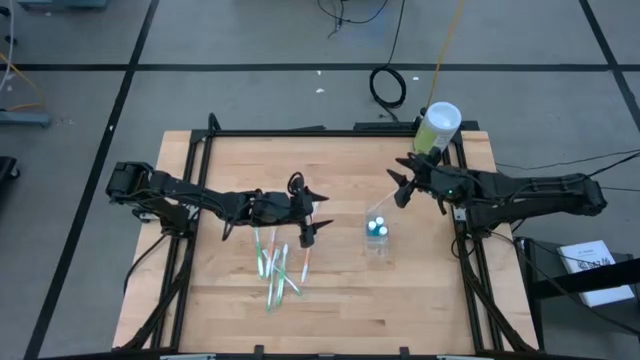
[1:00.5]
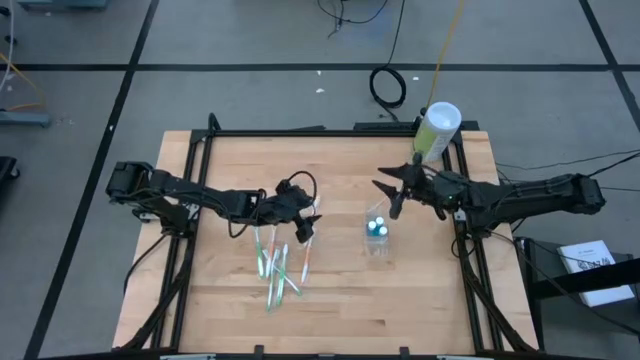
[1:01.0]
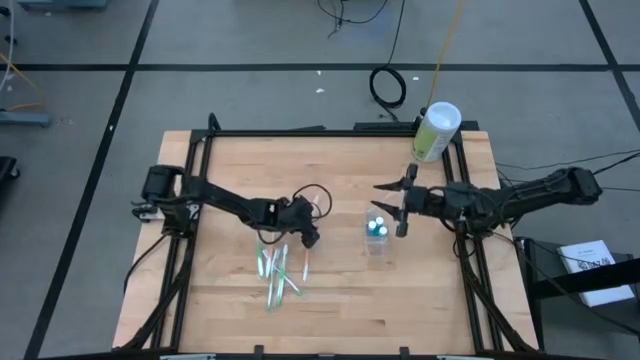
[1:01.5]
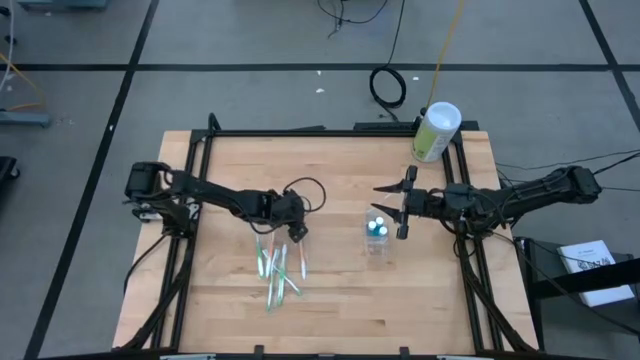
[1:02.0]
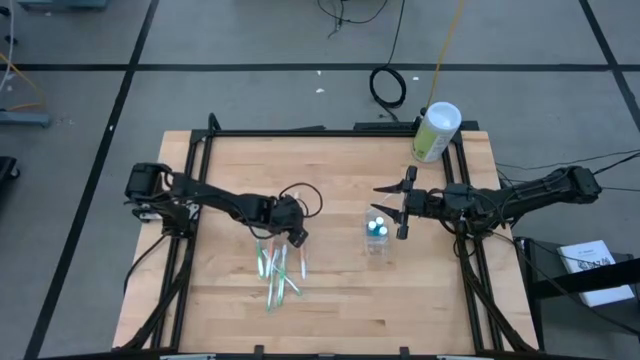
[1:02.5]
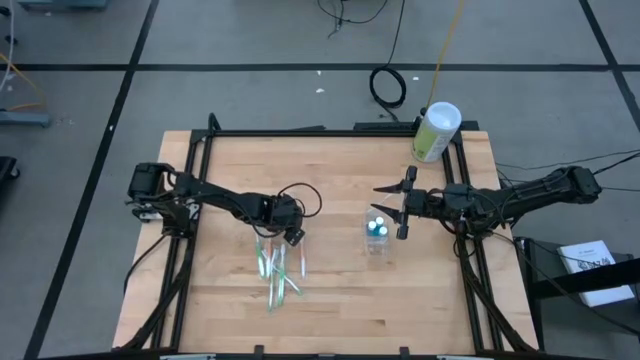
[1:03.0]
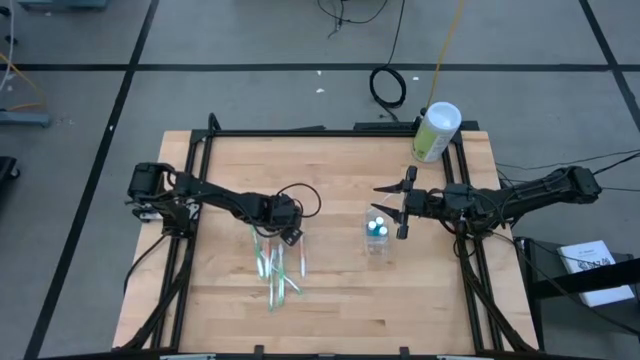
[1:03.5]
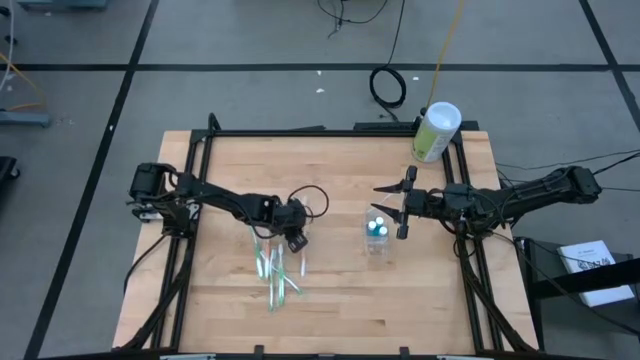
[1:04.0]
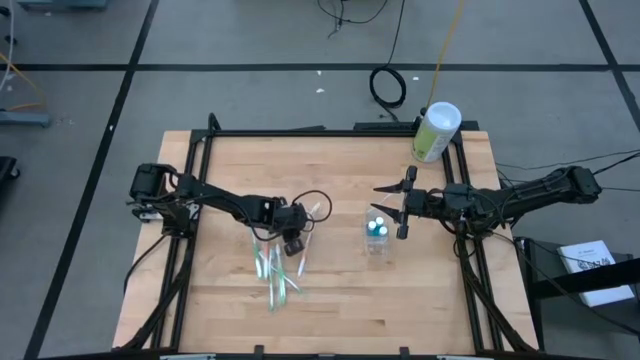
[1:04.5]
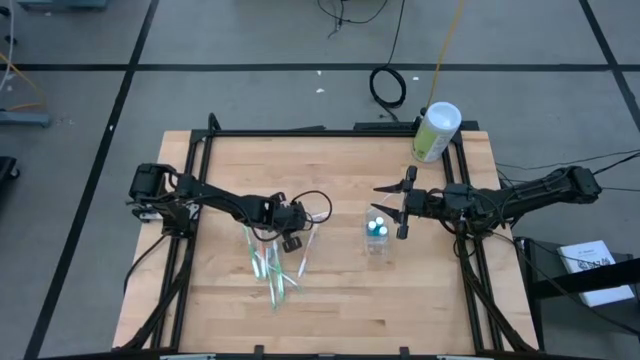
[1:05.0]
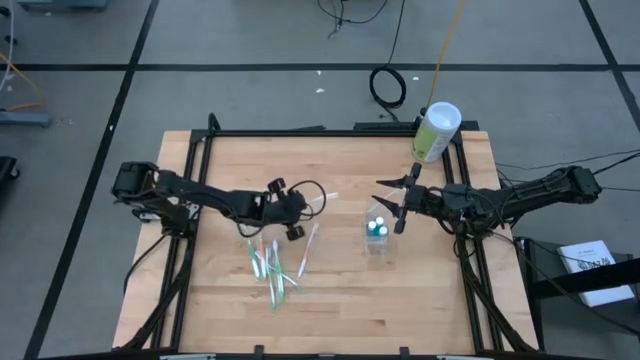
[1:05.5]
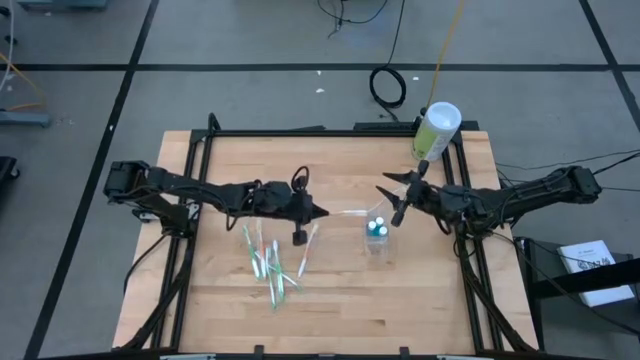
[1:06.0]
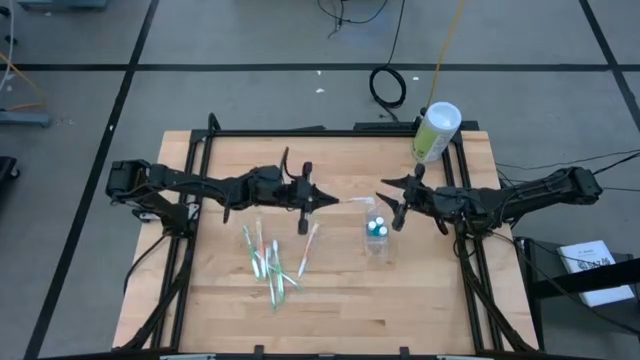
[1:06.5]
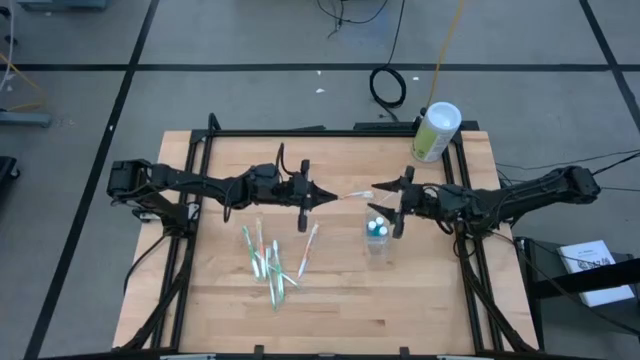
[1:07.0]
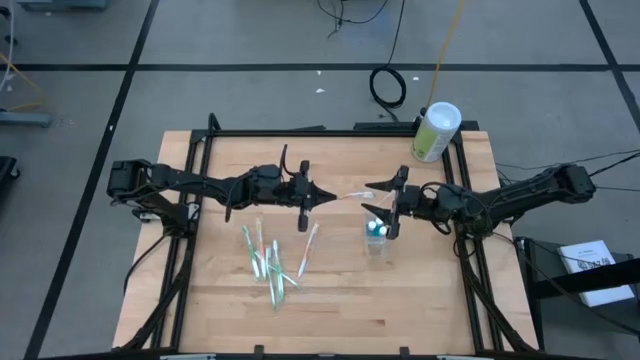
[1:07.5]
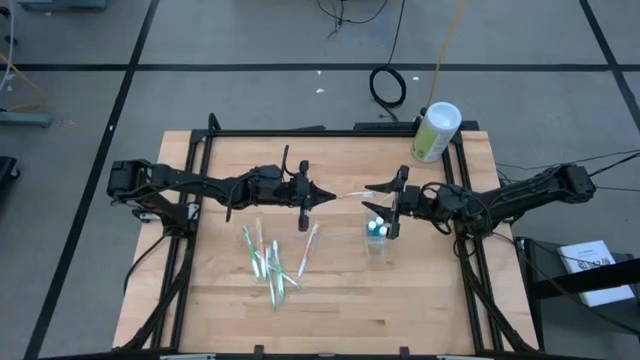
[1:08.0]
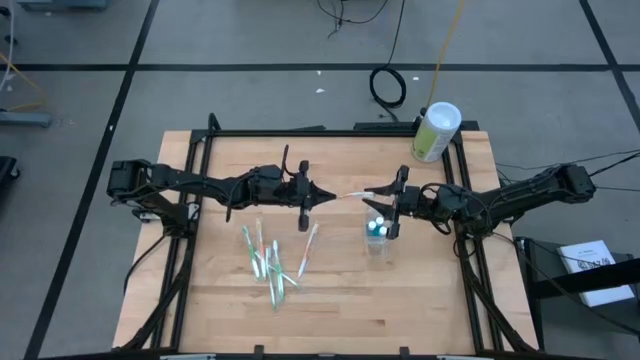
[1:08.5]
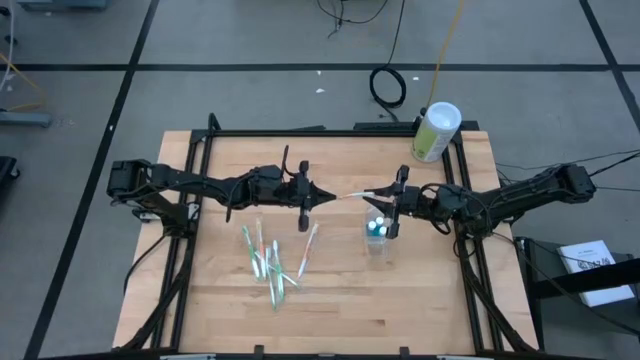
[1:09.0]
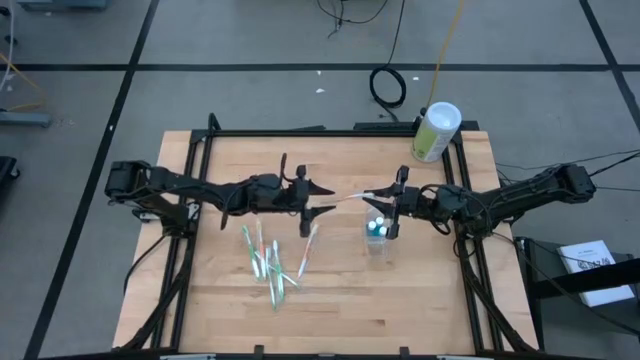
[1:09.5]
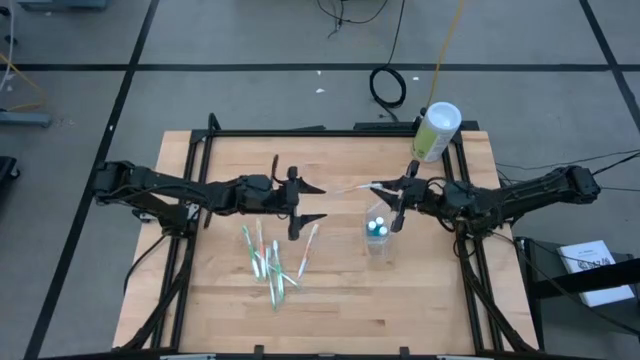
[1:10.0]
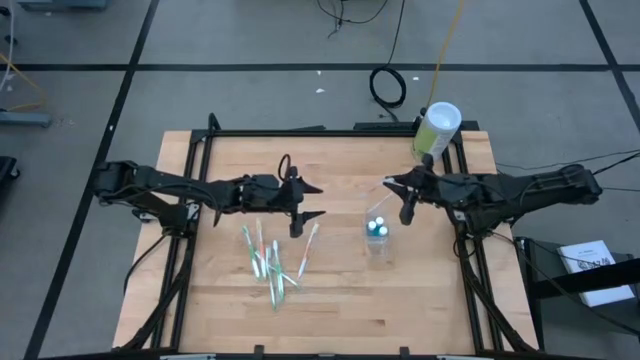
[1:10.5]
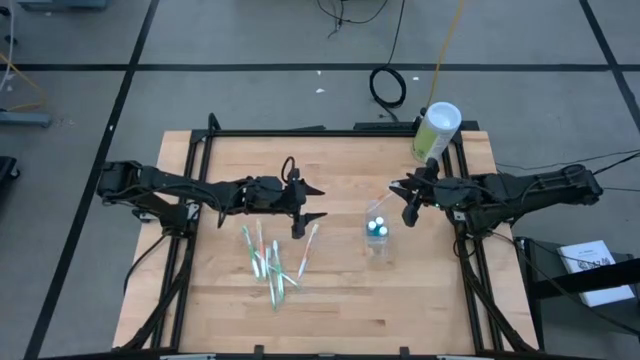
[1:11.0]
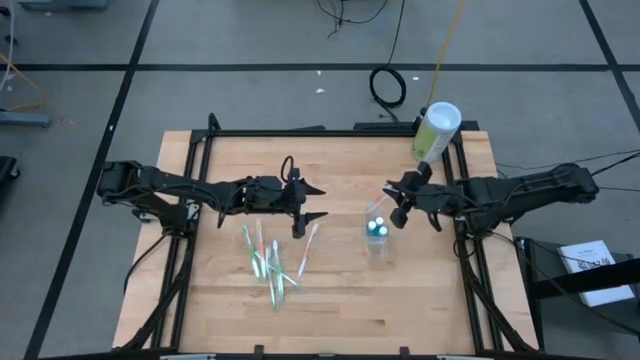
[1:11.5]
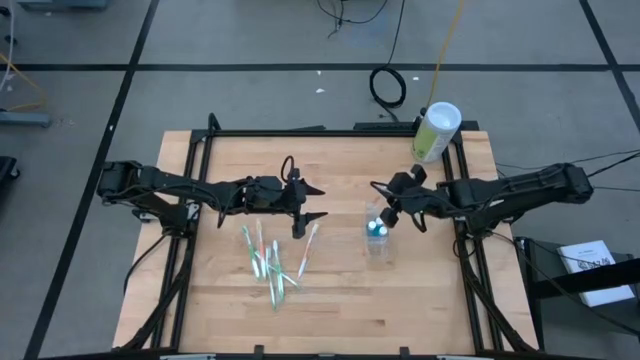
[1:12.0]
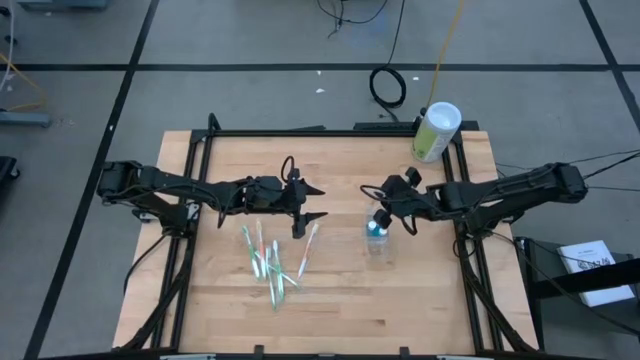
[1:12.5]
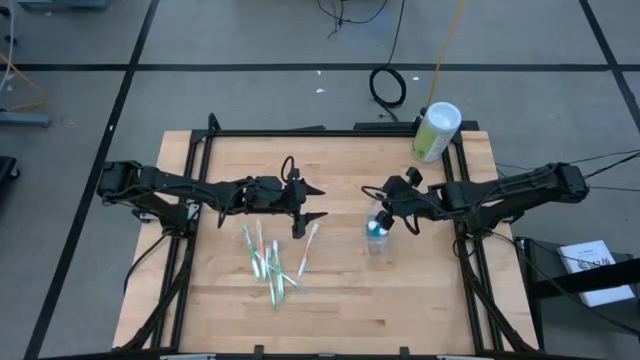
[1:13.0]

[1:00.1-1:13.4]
Task: Pick & Place toothbrushing station
Put the orange toothbrush into the top of the transparent organizer

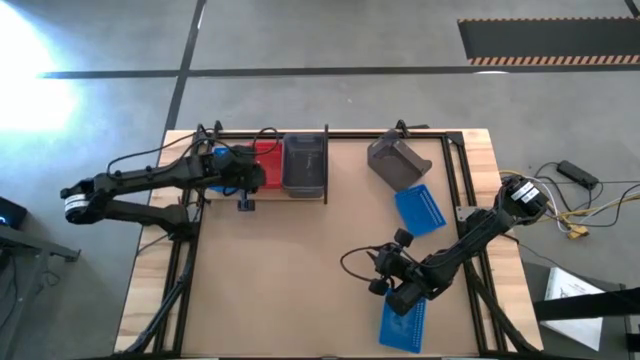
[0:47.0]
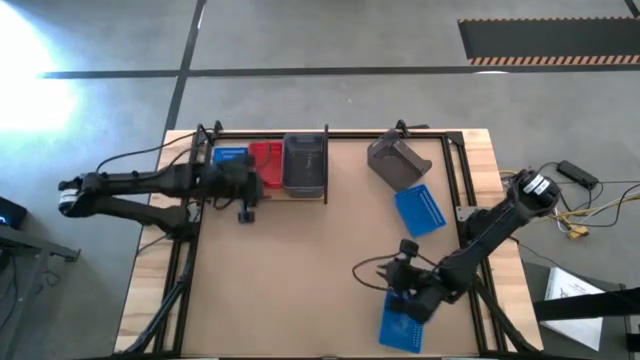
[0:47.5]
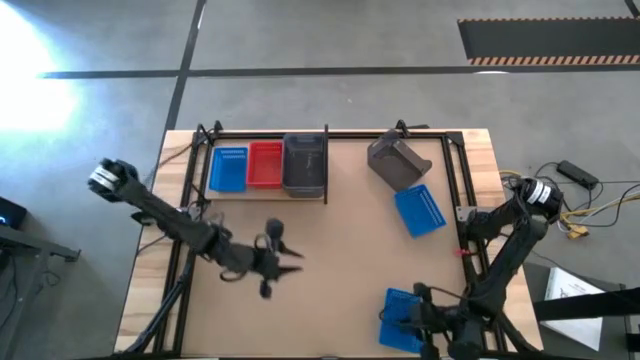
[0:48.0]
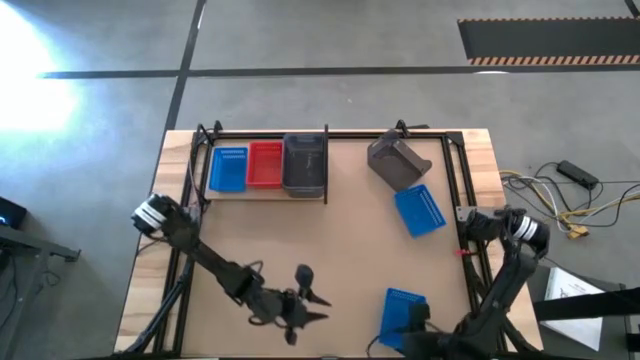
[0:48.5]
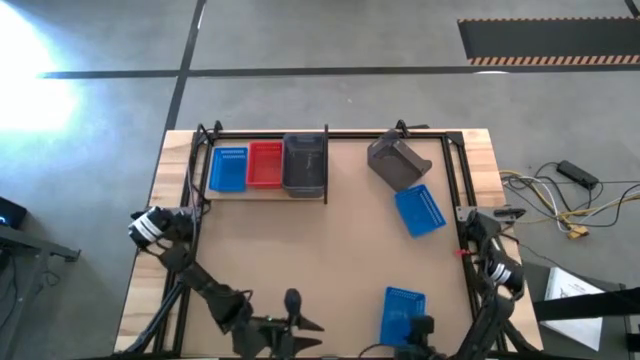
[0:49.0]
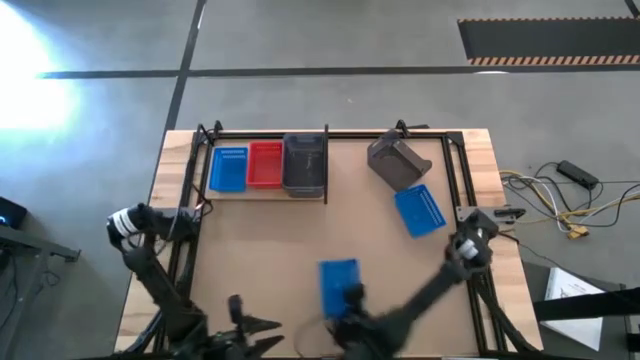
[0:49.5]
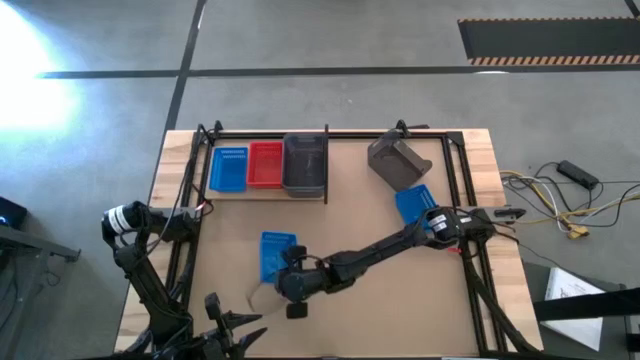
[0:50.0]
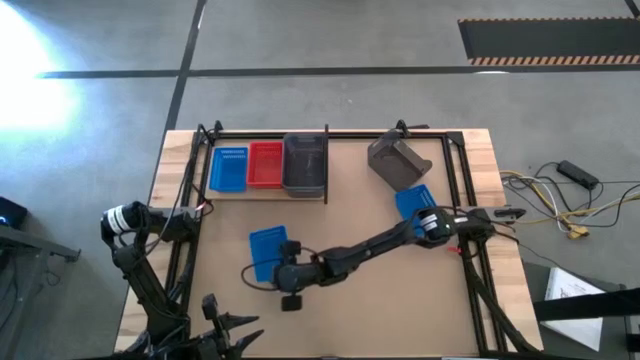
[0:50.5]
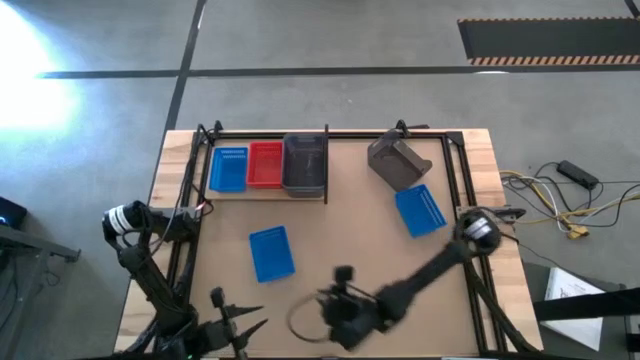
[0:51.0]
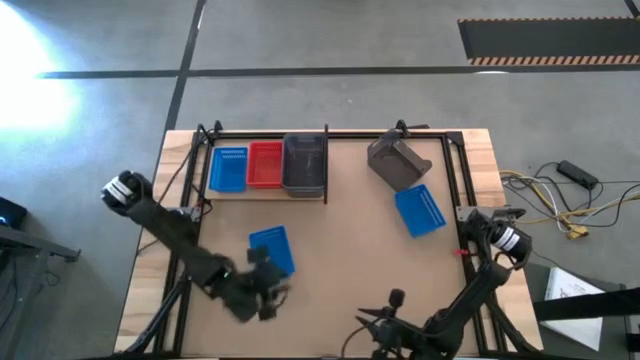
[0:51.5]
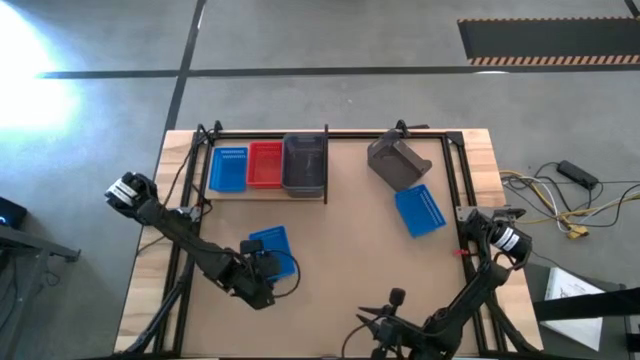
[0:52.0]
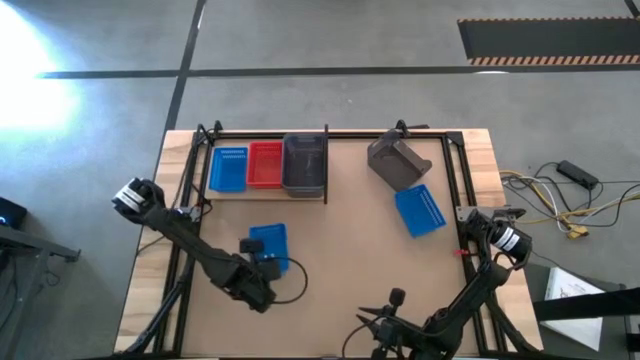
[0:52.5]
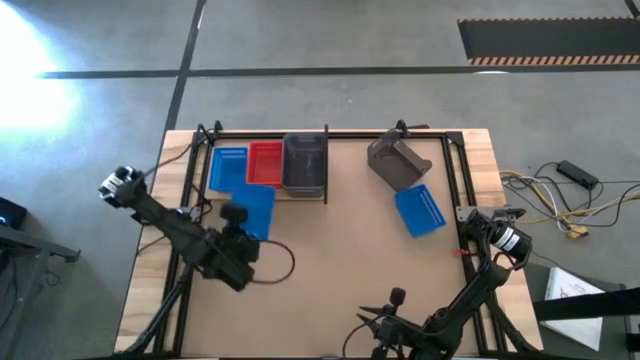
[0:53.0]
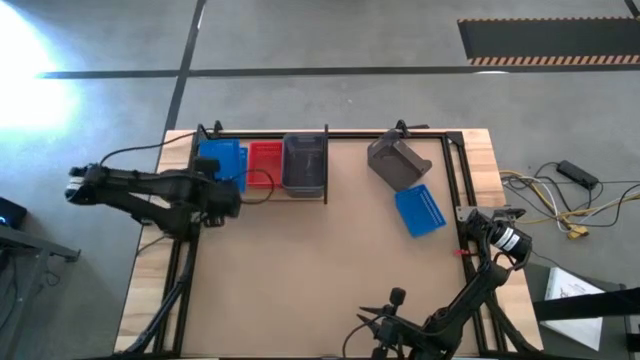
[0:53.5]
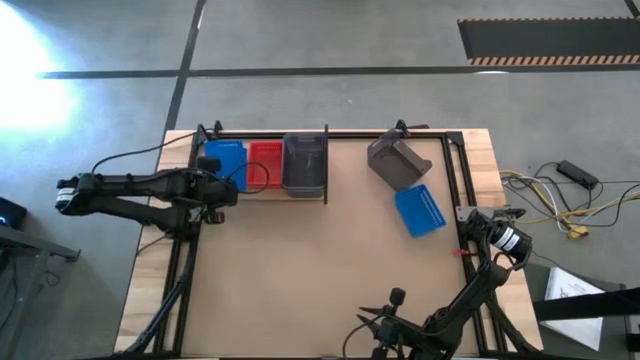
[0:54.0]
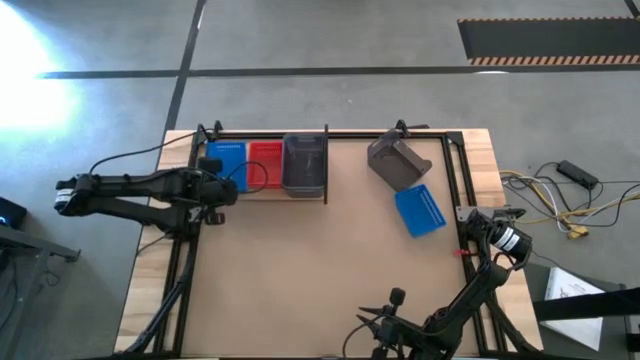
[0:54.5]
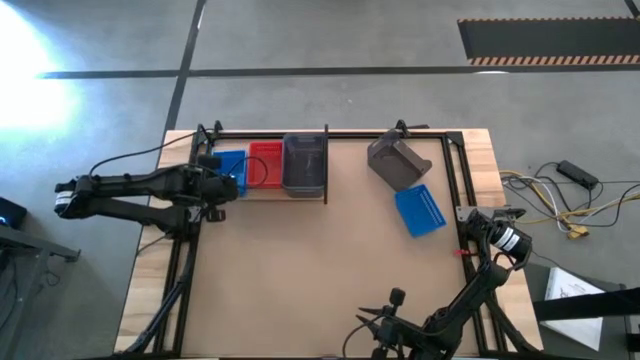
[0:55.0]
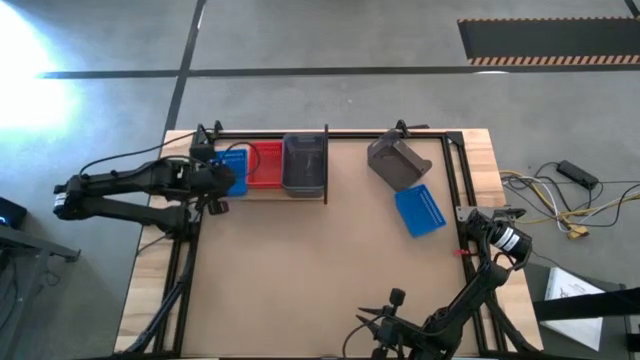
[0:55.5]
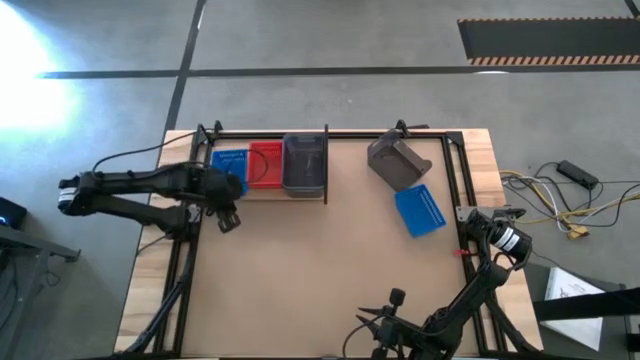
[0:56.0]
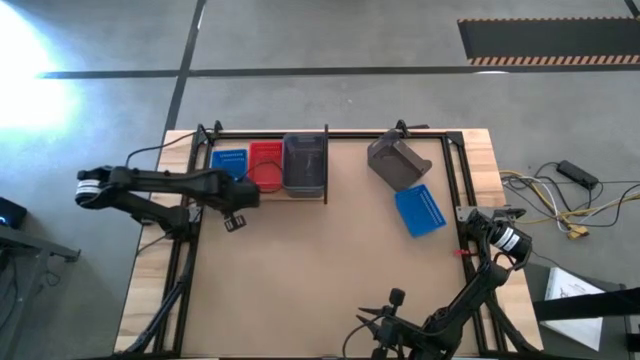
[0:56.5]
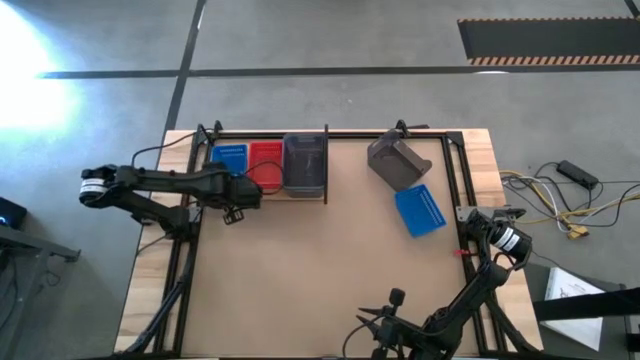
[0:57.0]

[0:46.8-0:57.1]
Task: Stack baskets on shelf by color
Stack the bottom blue bin on the blue bin on the shelf
